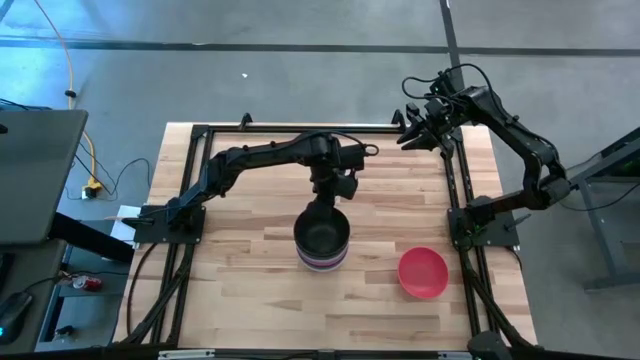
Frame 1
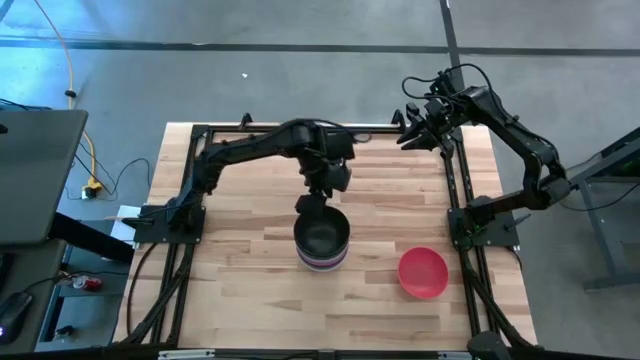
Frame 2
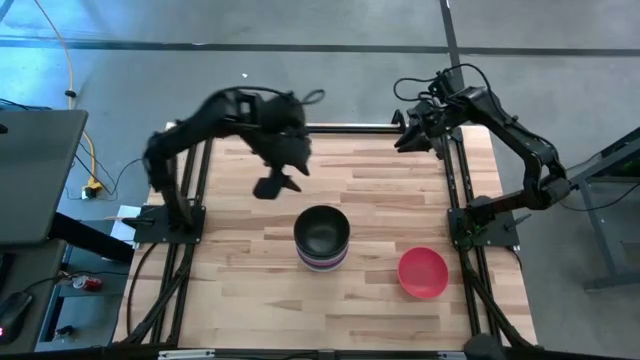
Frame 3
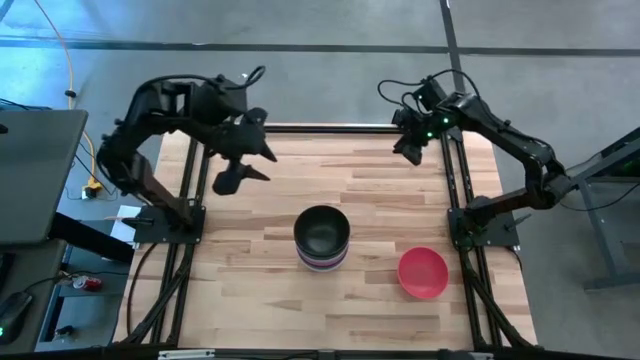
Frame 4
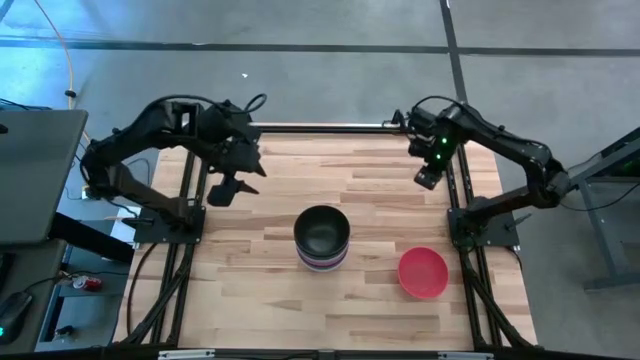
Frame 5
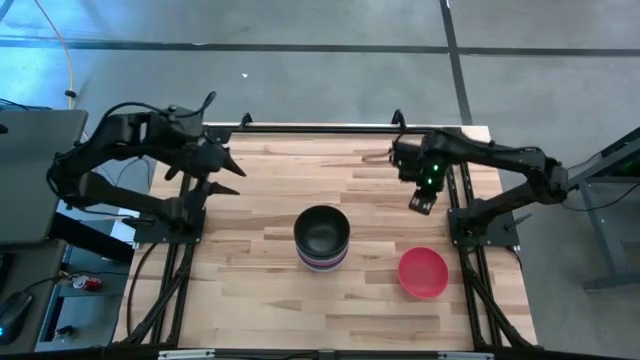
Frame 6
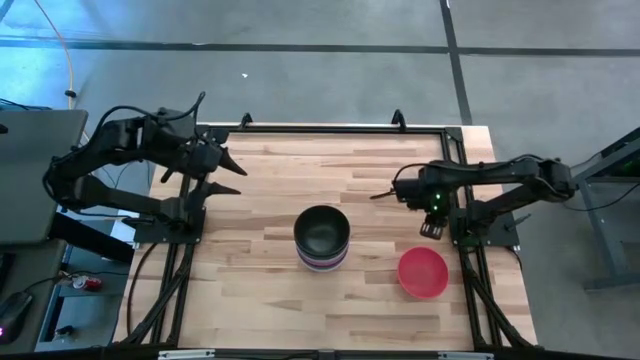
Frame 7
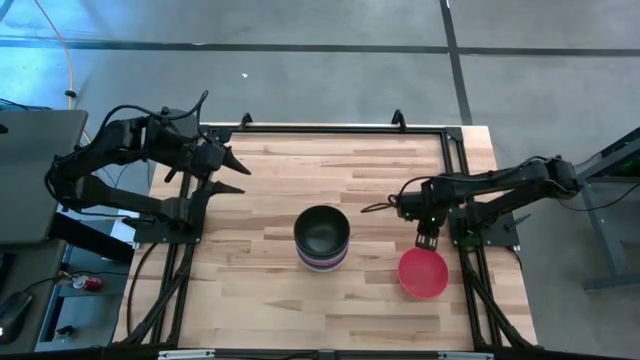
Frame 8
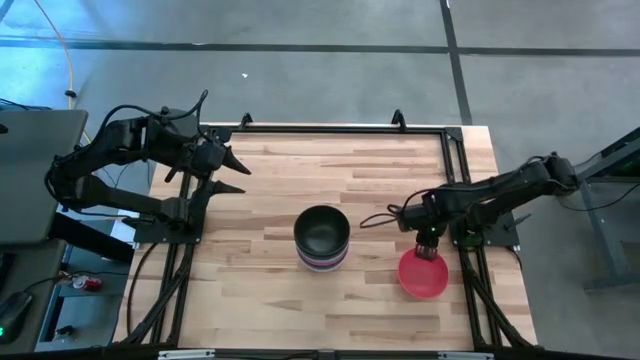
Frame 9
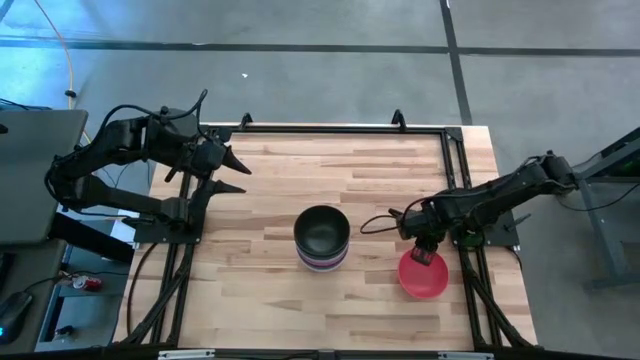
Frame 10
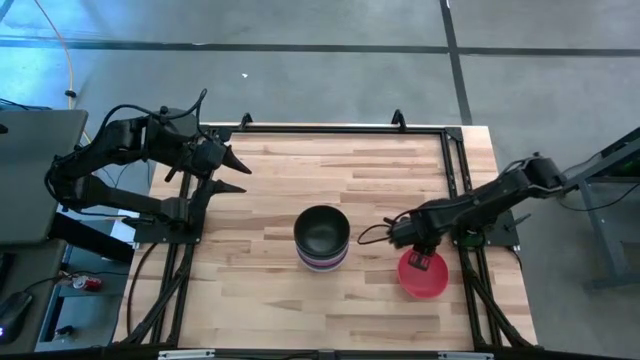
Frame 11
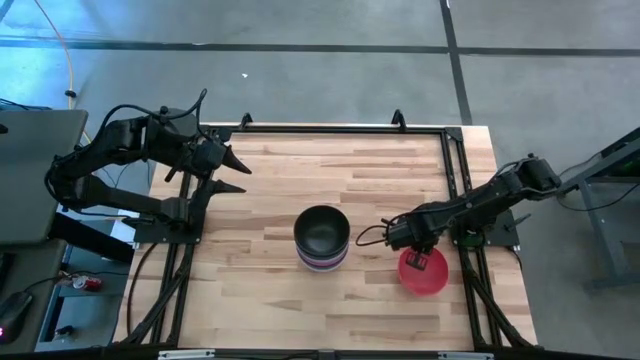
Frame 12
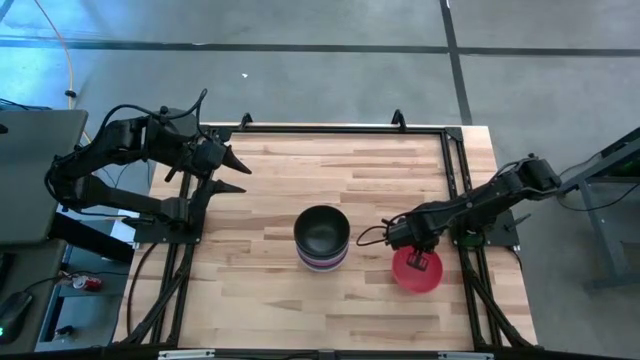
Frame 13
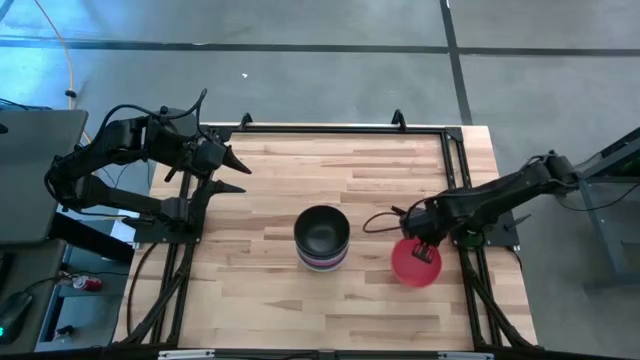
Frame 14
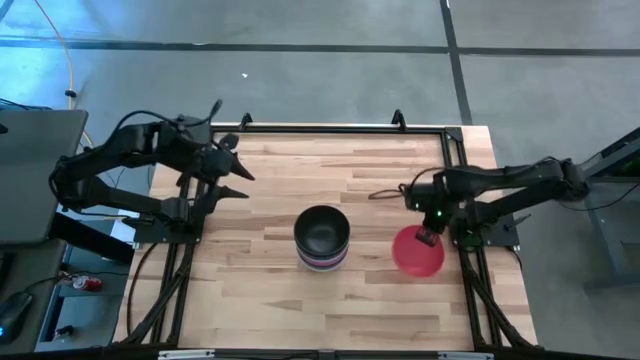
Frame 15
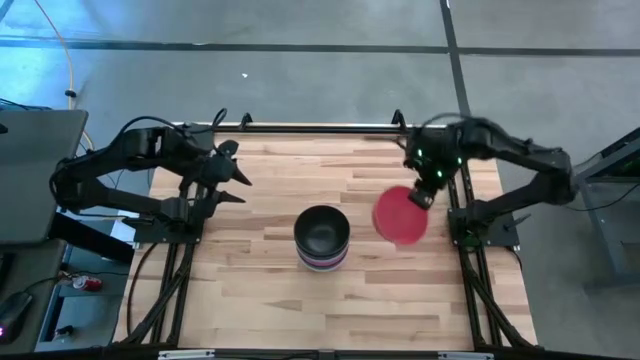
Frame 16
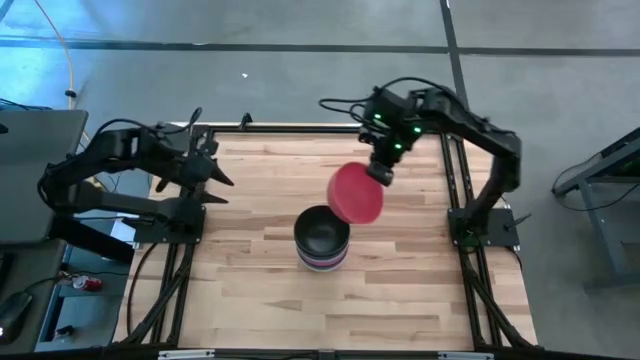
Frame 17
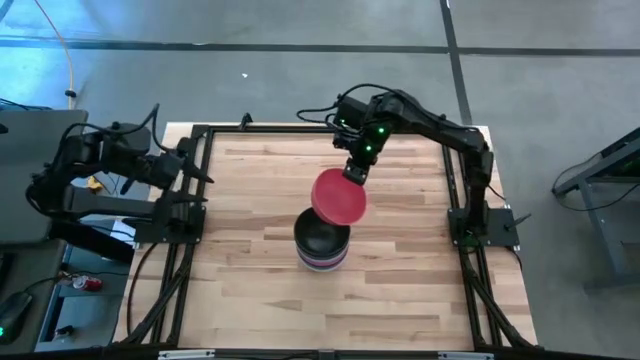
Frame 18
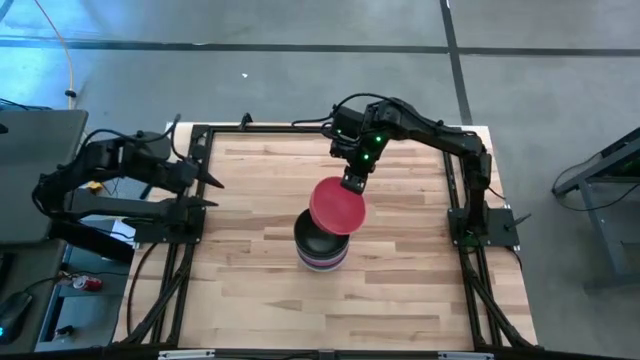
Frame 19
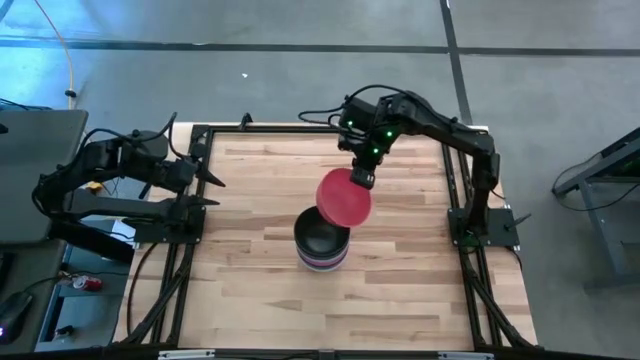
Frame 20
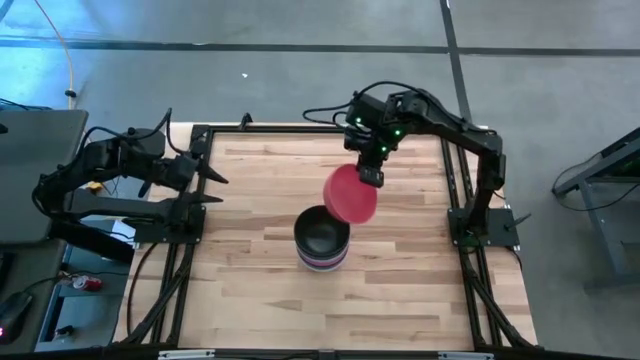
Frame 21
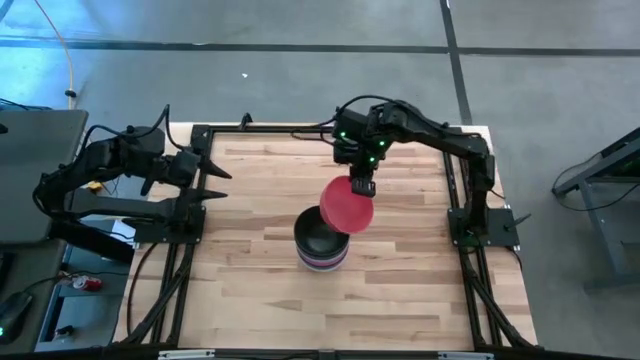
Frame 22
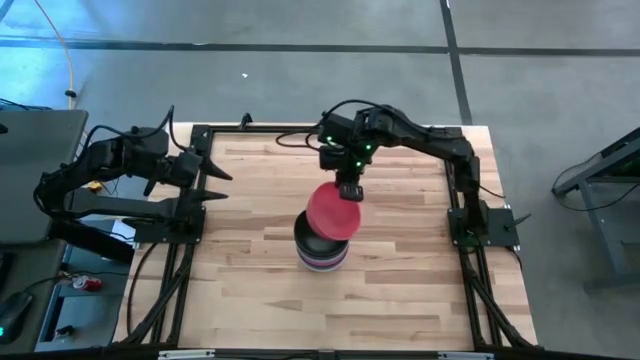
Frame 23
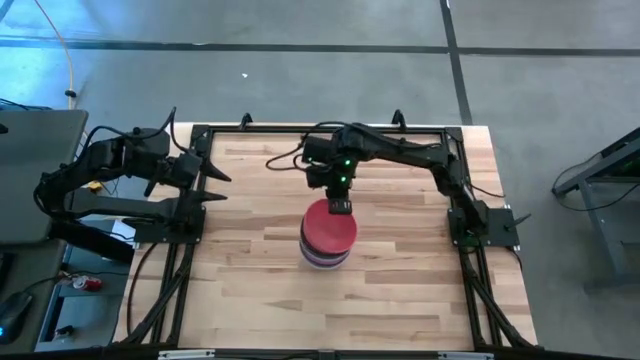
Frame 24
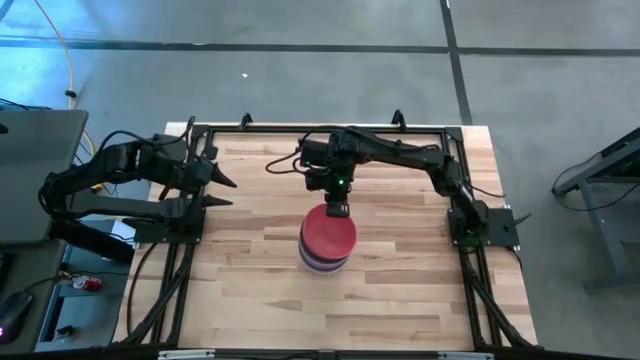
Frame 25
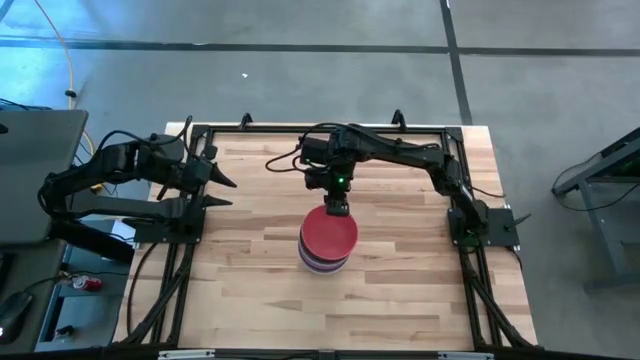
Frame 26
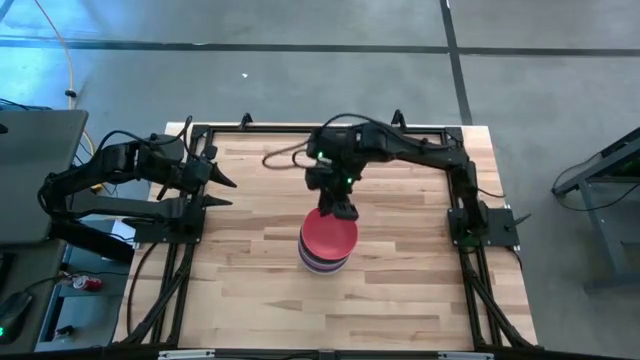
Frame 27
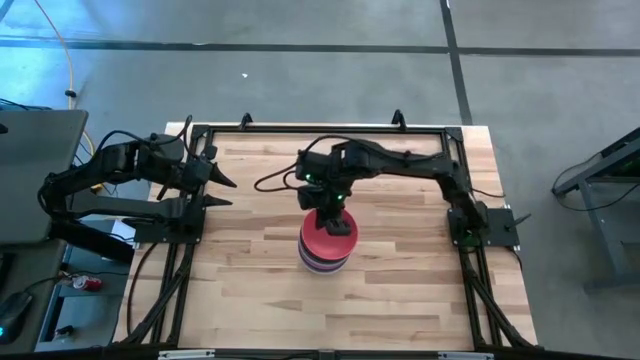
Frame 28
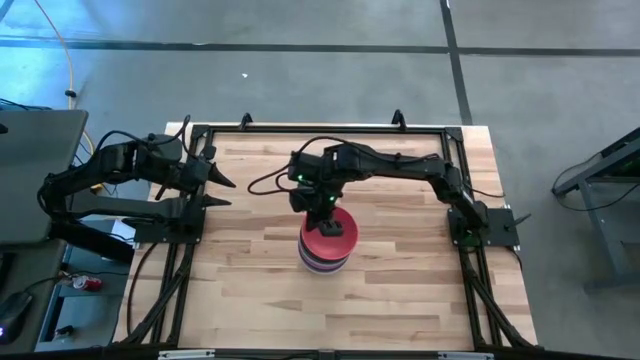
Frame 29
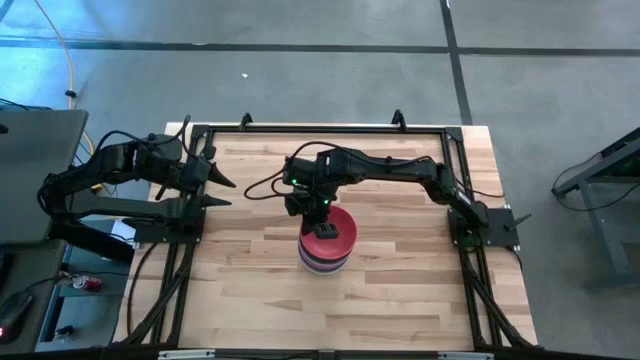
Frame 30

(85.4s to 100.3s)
Task: Nest bowls inside each other
Stack the orange bowl on top of the black bowl

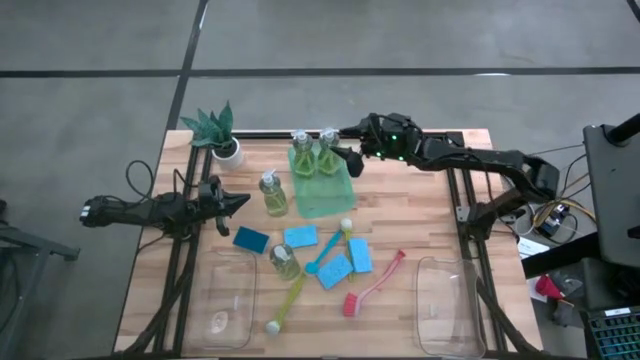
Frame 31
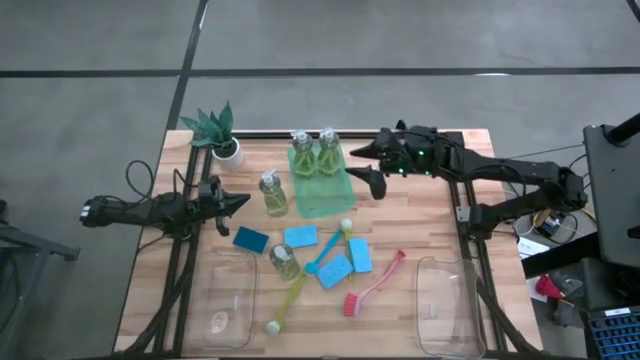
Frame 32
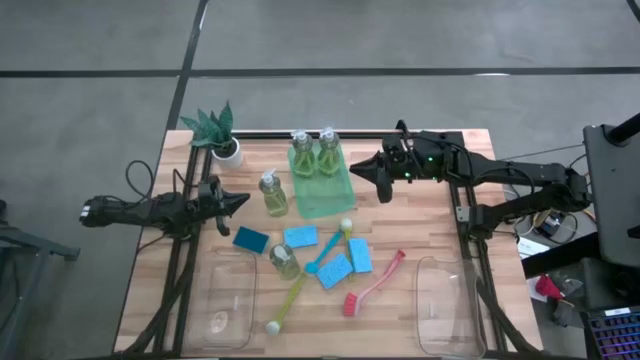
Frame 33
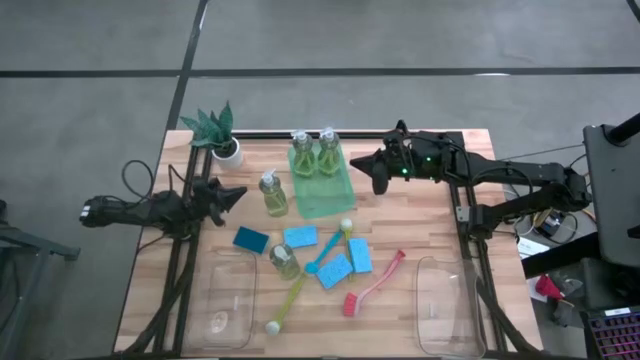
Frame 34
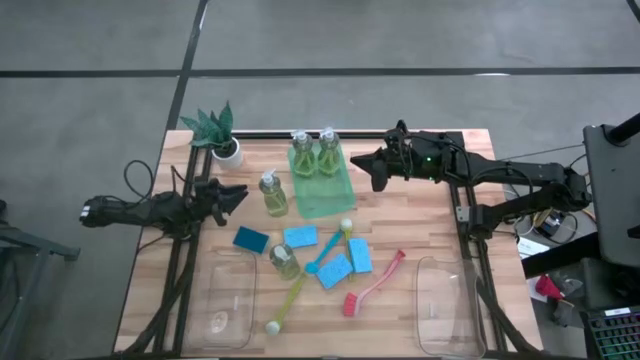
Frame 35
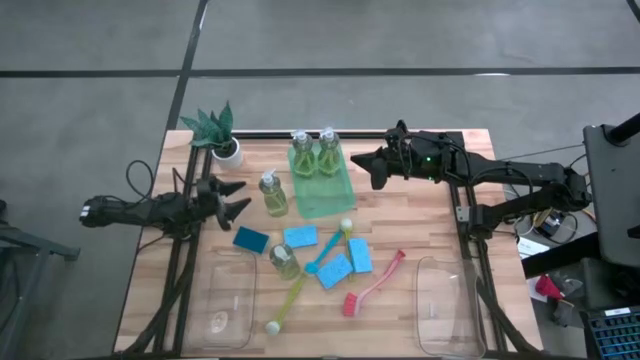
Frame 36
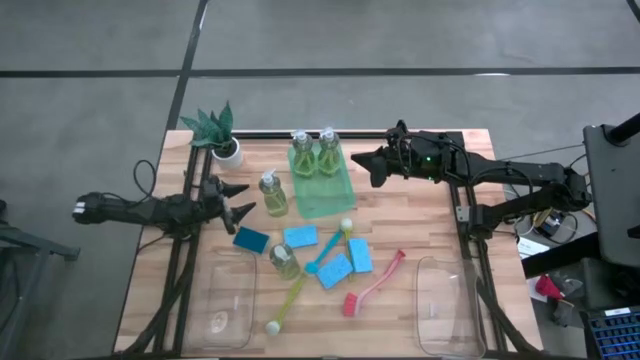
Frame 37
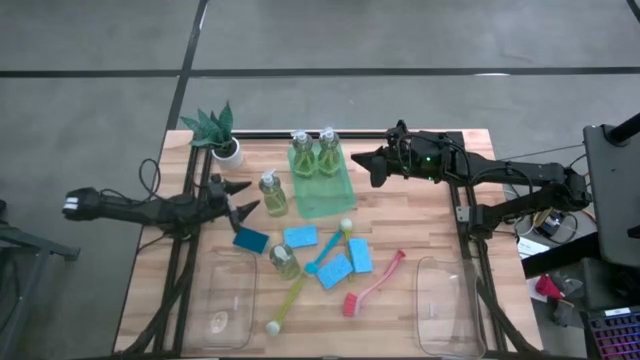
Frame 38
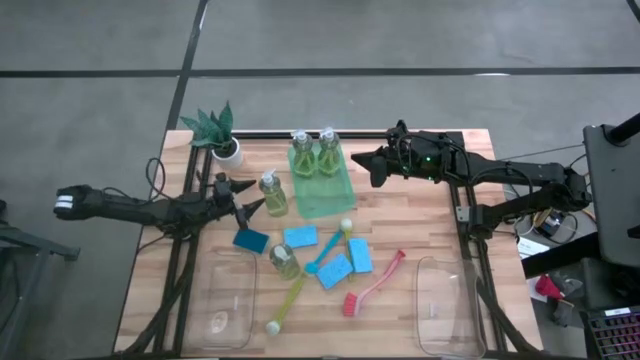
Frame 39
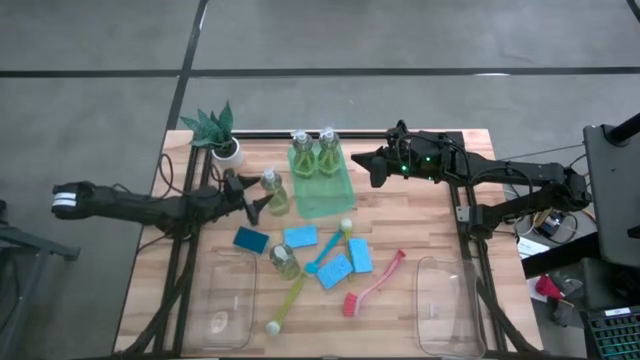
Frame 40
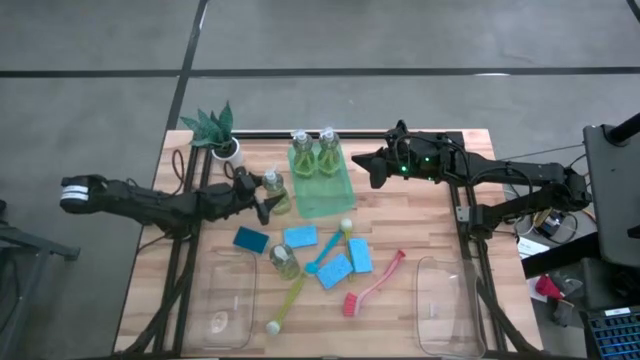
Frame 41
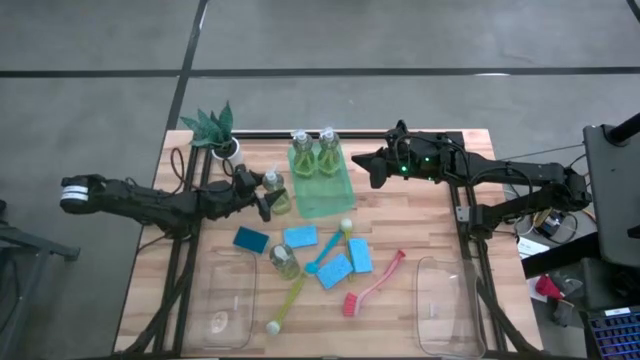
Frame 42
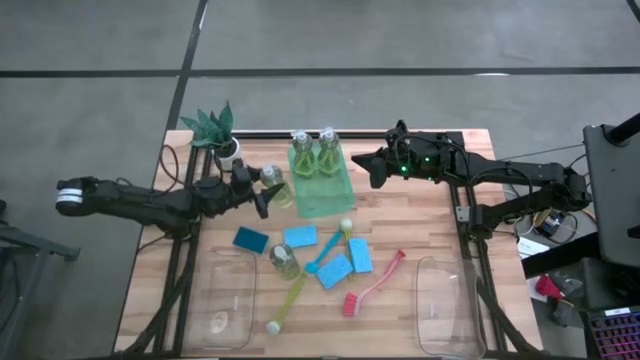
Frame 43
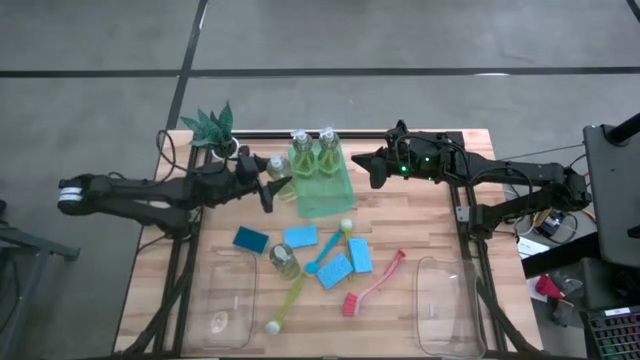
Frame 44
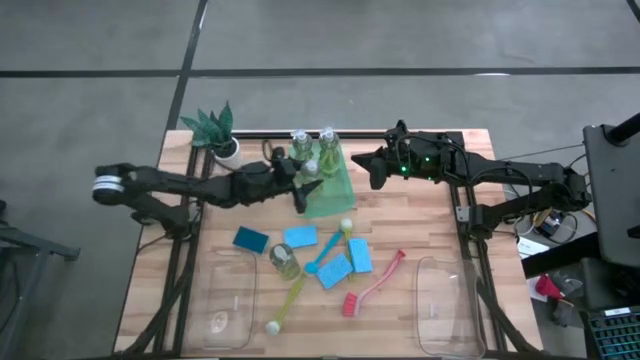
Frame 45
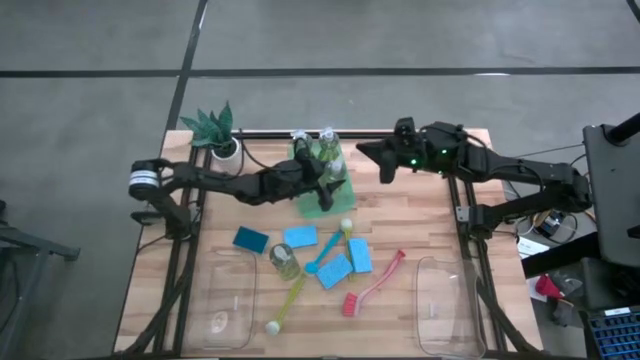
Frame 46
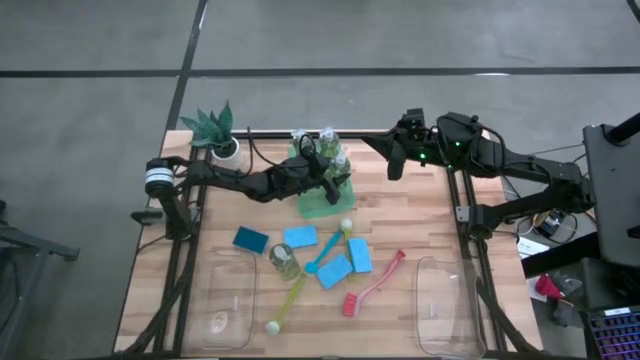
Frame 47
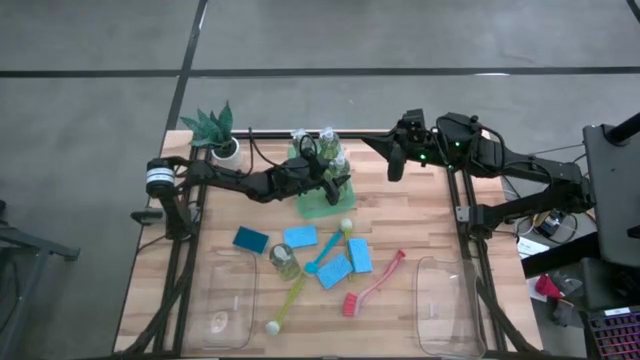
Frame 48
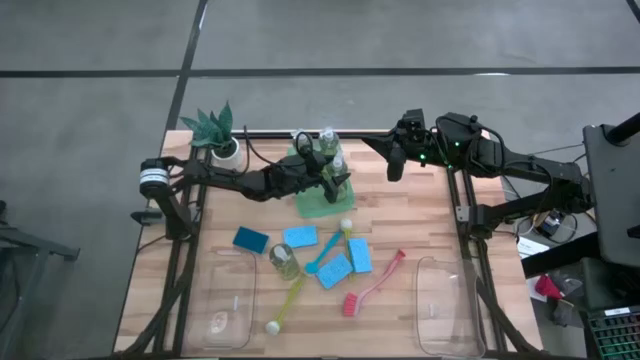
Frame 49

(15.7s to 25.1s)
Task: Pick & Place Kitchen Sink Supplies
Put the green soap dispenser into the green bin
